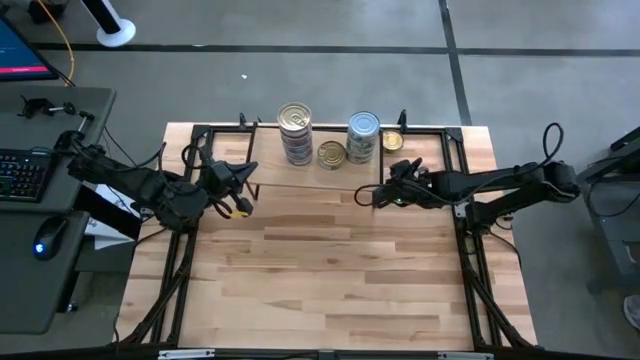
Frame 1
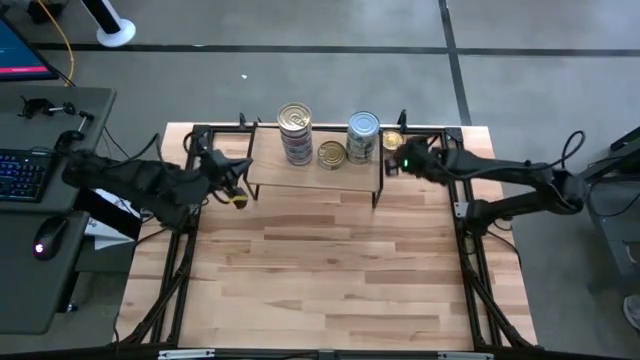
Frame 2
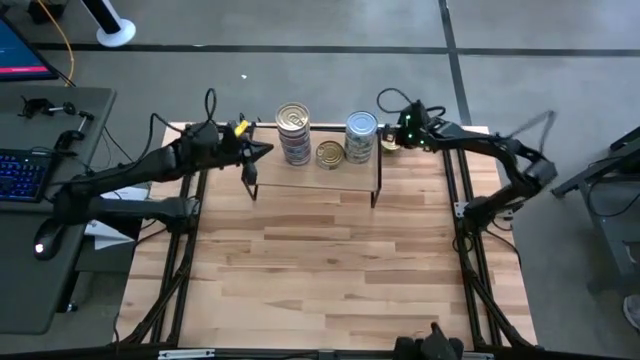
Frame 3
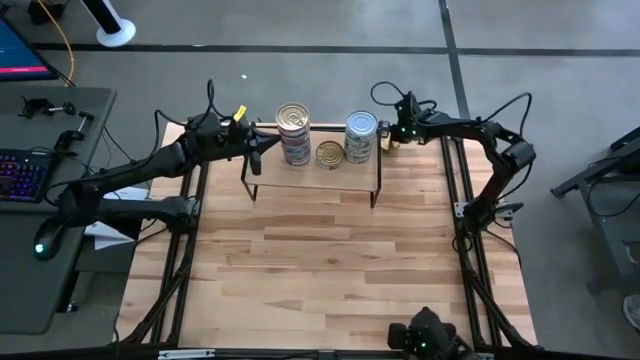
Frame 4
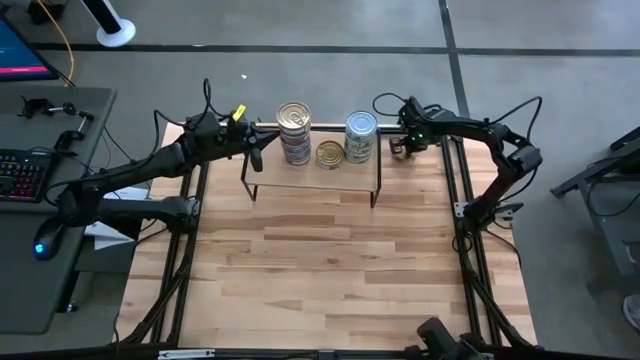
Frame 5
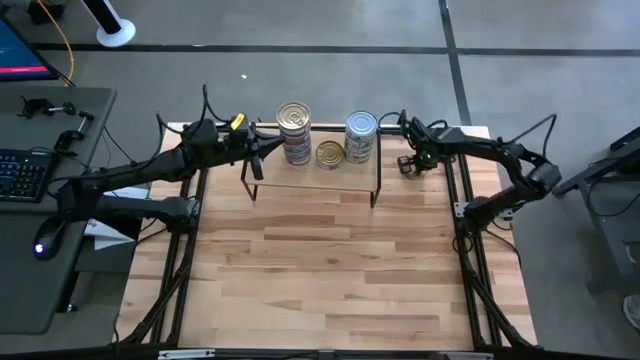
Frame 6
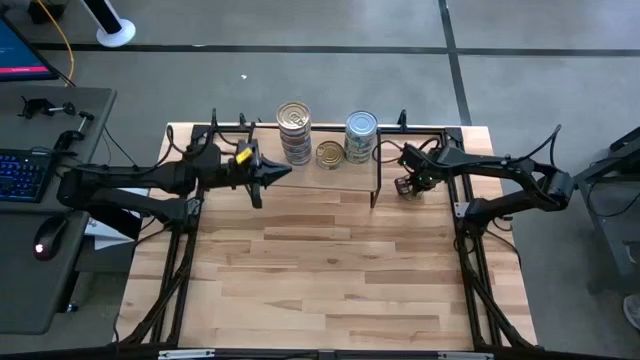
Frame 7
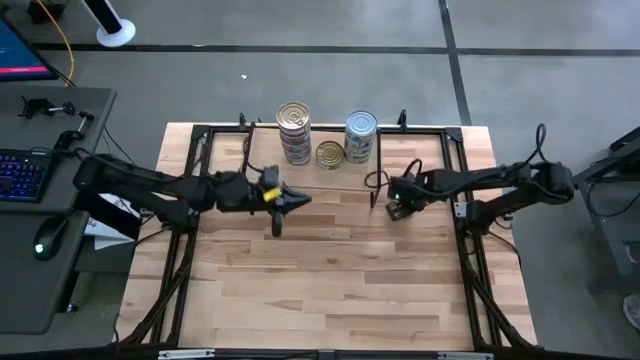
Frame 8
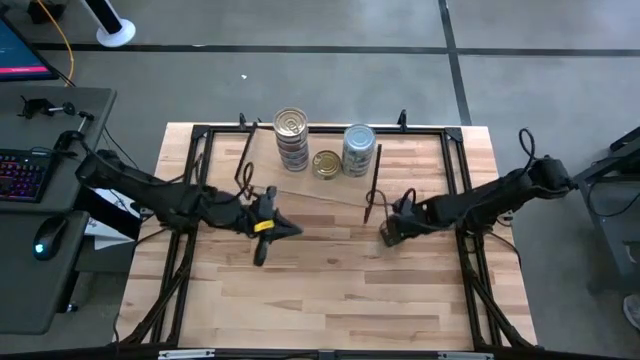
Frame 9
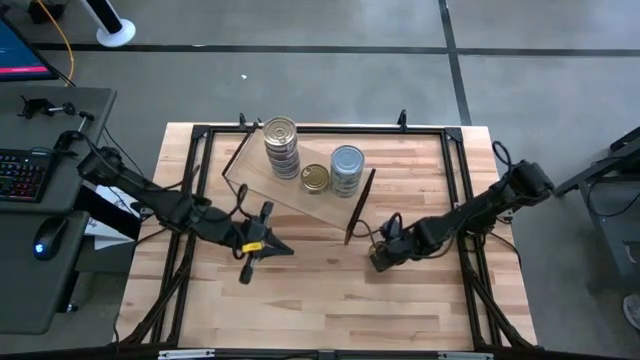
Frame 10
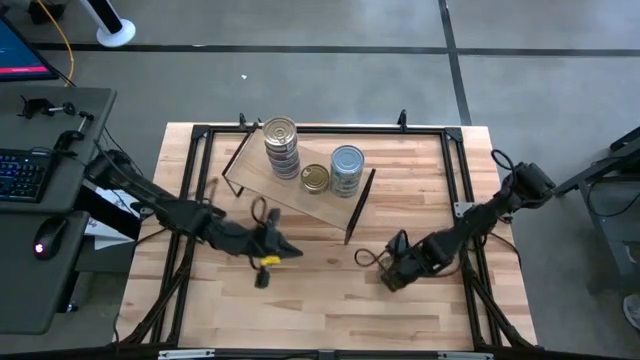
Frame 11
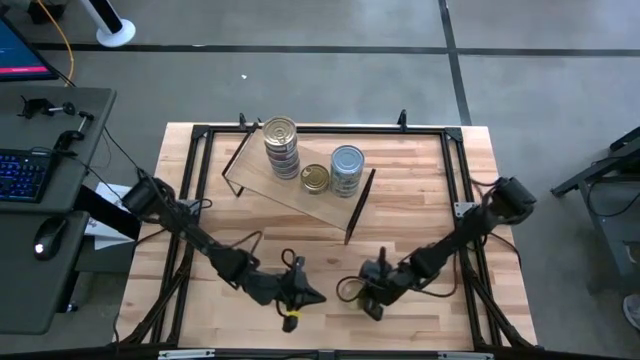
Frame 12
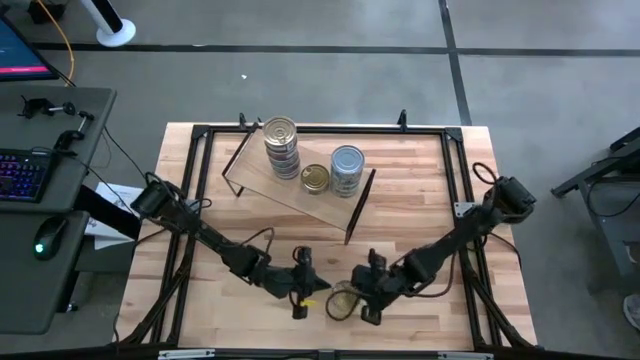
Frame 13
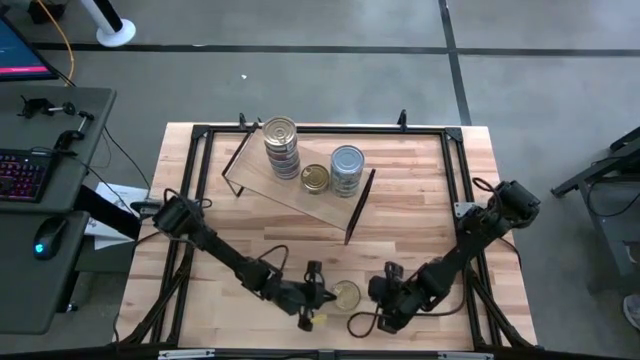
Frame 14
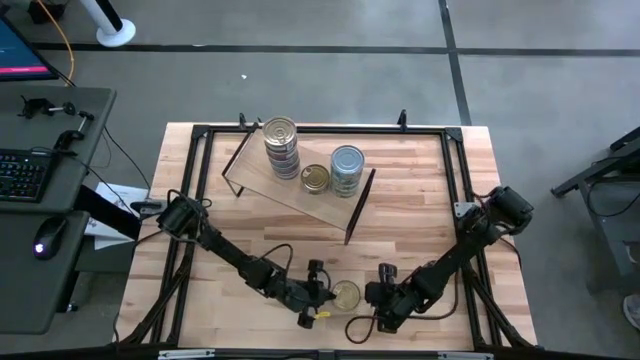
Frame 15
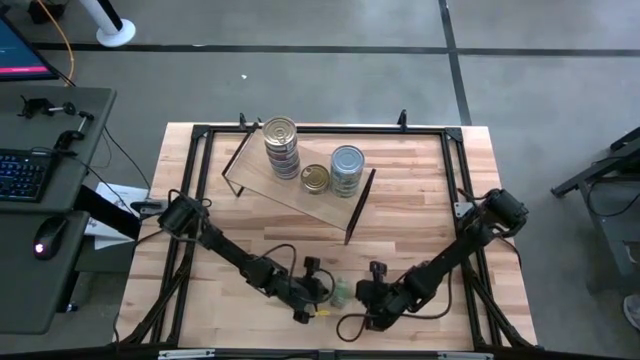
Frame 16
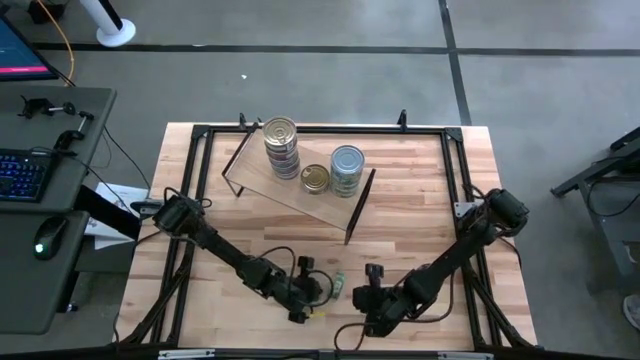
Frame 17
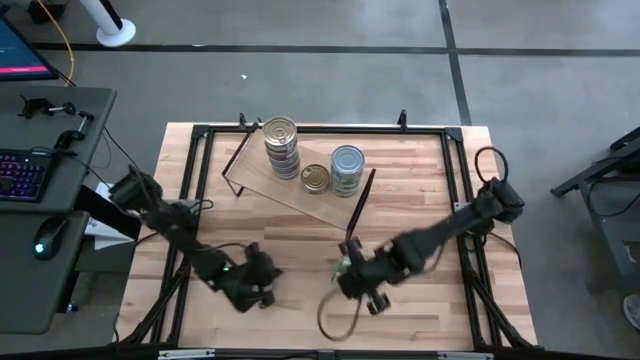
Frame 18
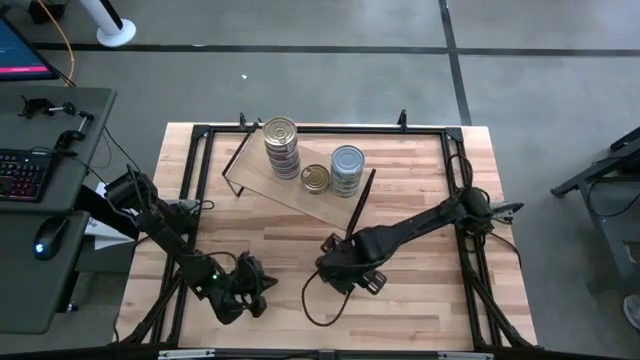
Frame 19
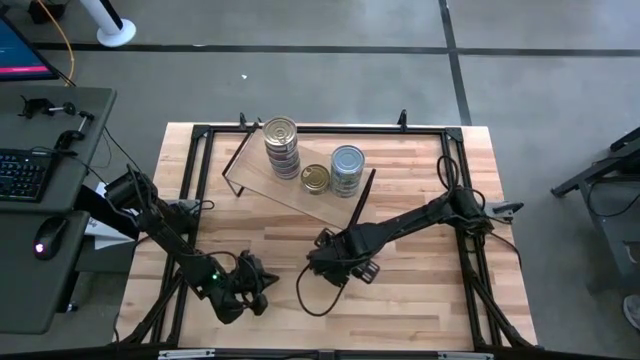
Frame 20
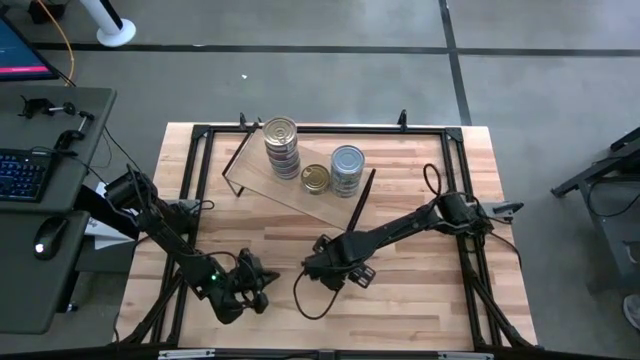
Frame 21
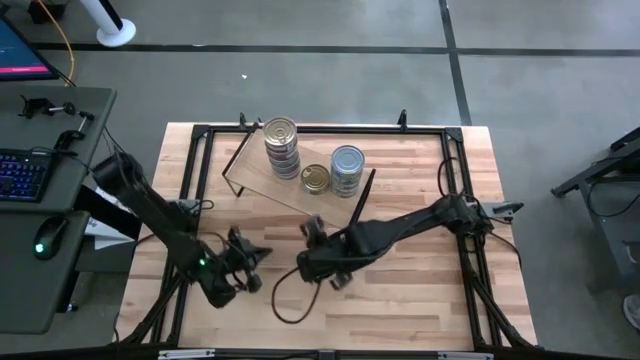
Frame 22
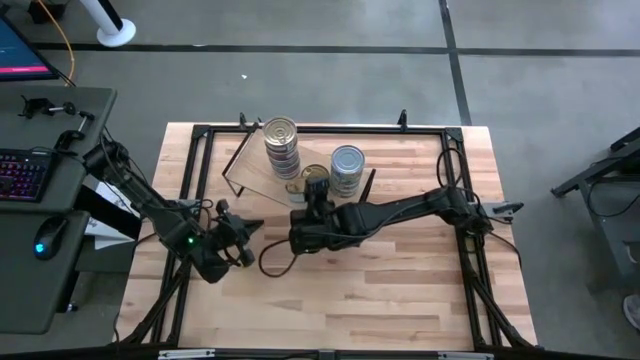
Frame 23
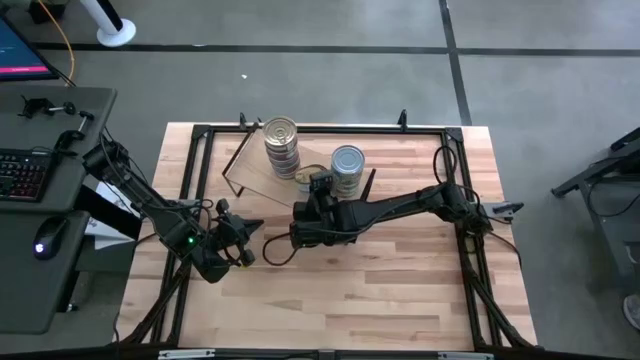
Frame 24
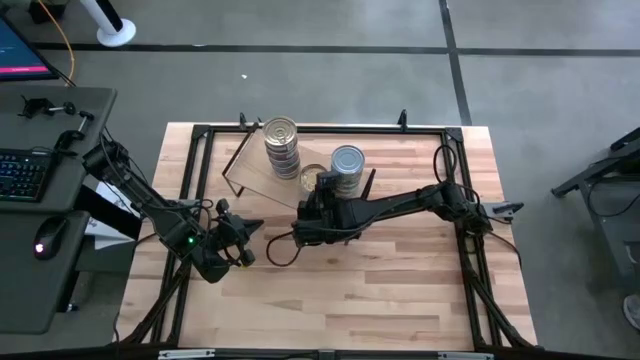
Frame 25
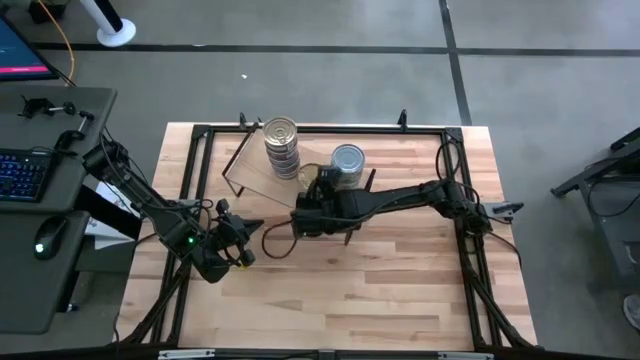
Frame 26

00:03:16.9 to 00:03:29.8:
Task: Stack canned seafood by type on shelf
Stack the green tuna can on top of the other green tuna can on the shelf

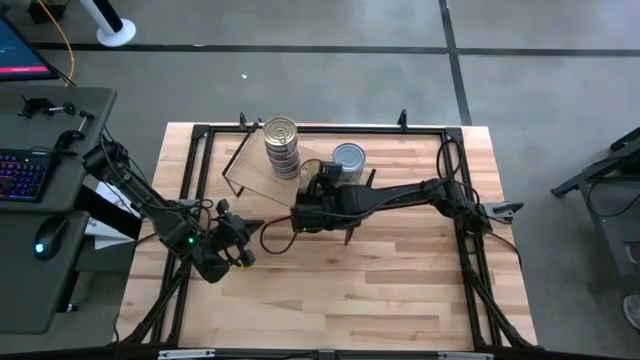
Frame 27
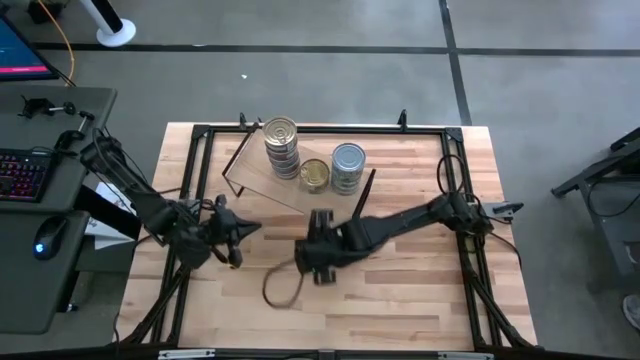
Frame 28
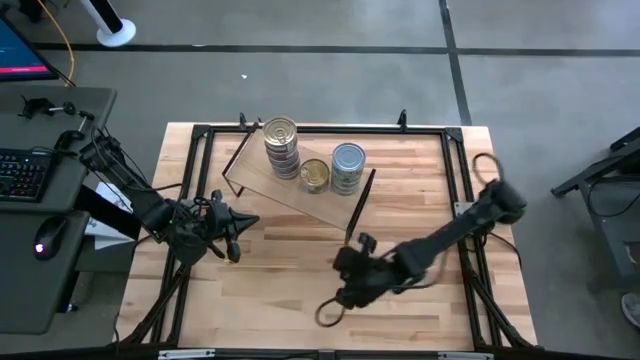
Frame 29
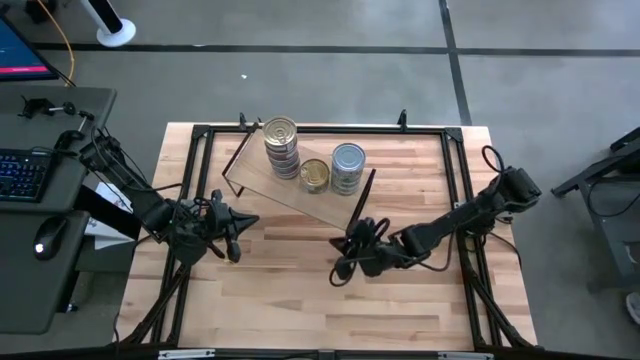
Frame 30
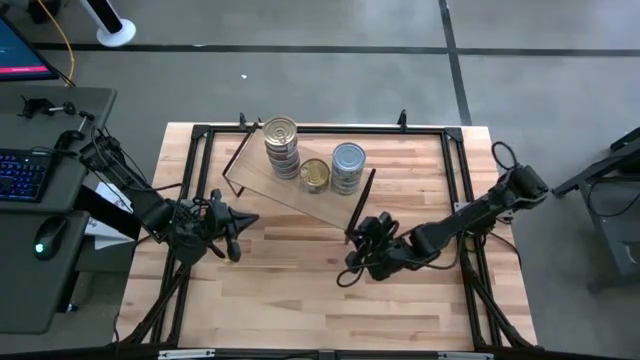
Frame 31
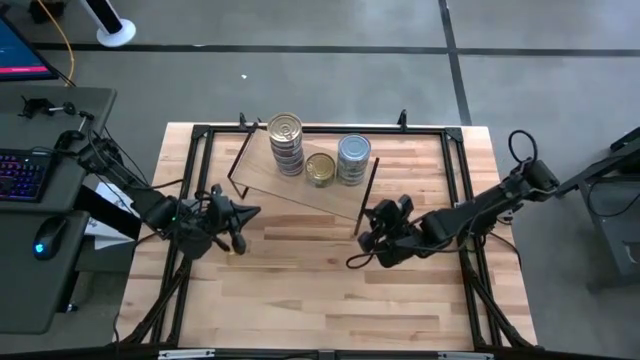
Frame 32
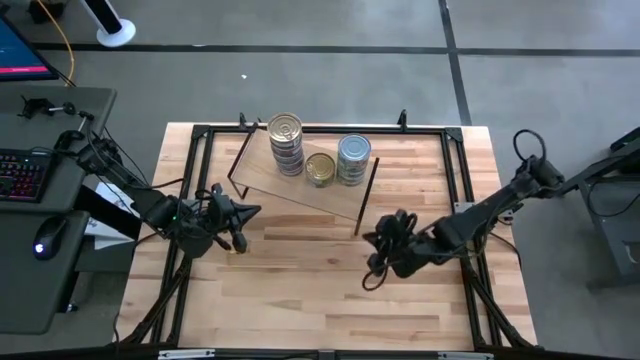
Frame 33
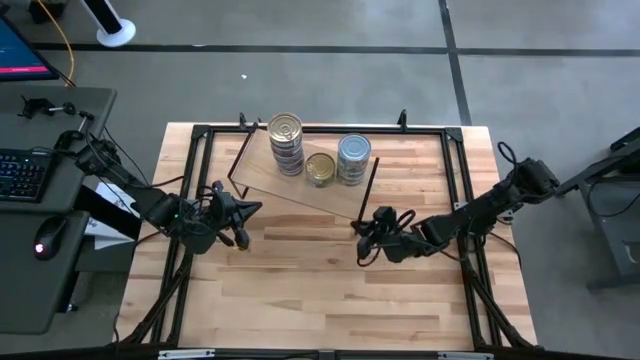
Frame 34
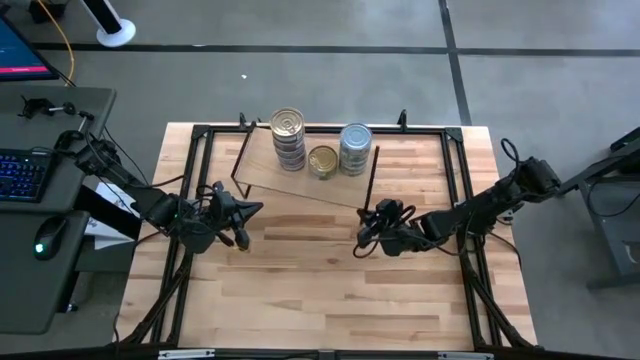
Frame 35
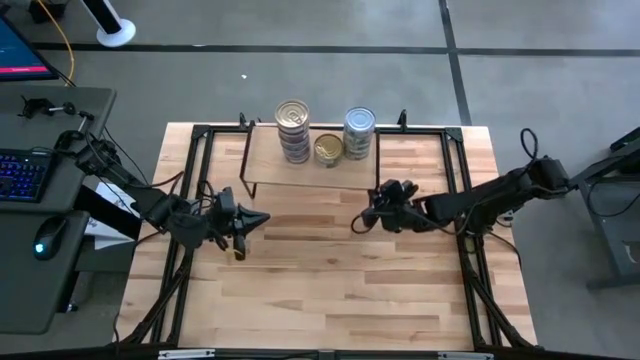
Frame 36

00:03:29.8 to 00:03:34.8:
Adjust the shelf on the table

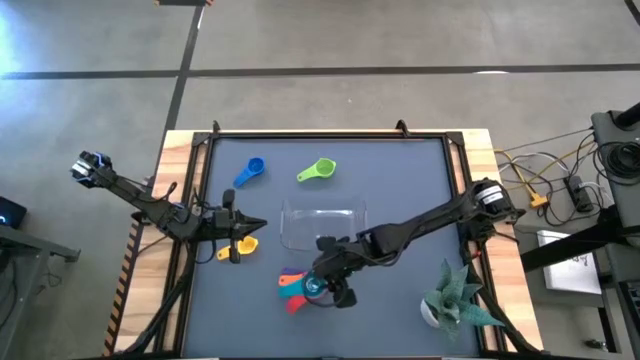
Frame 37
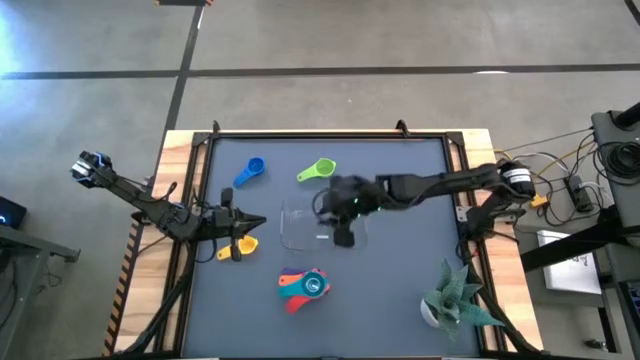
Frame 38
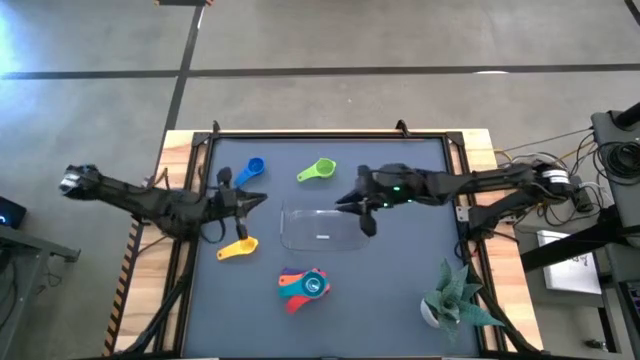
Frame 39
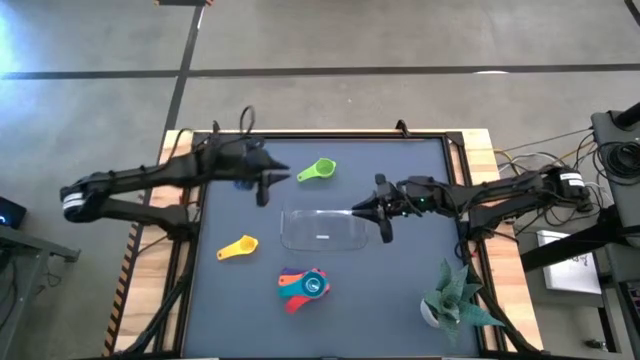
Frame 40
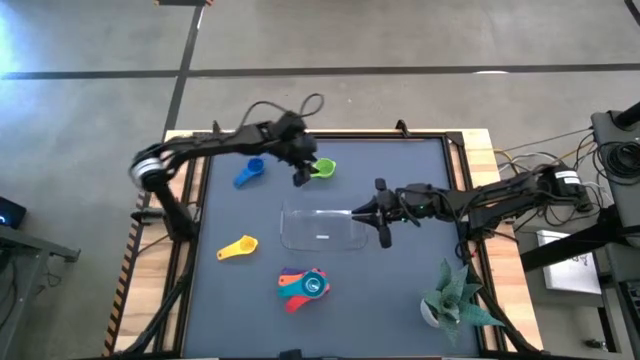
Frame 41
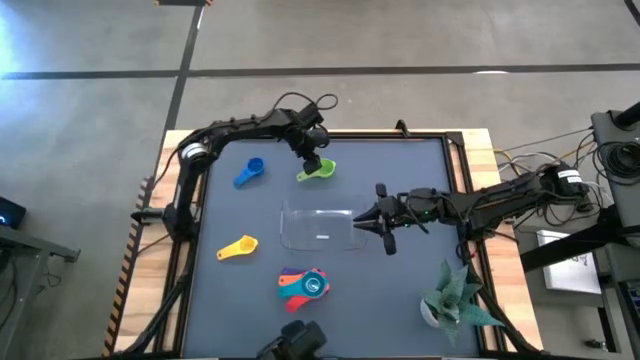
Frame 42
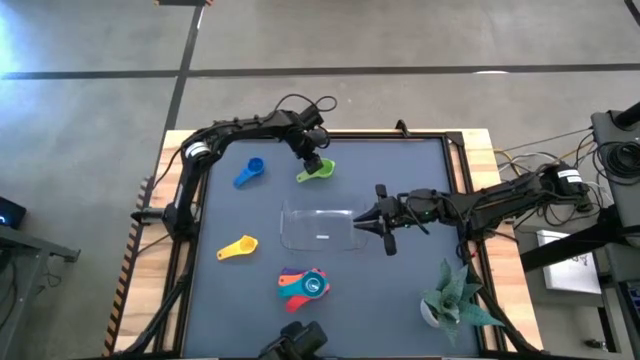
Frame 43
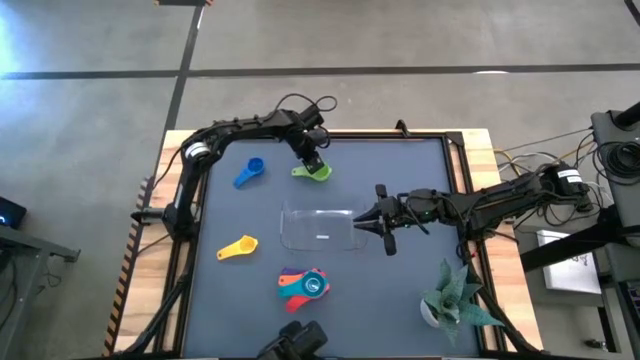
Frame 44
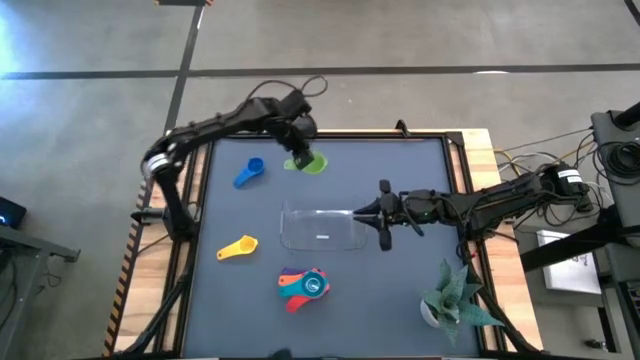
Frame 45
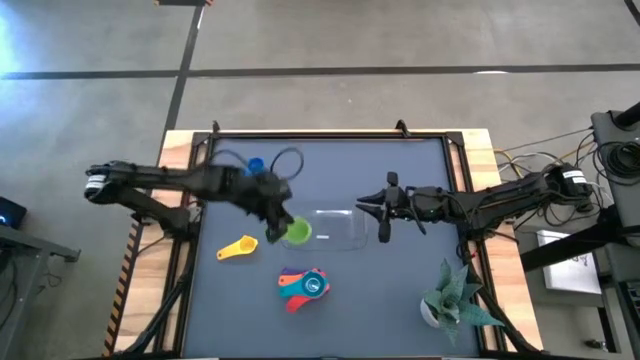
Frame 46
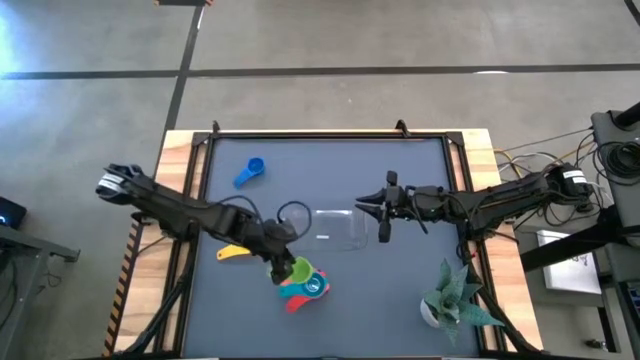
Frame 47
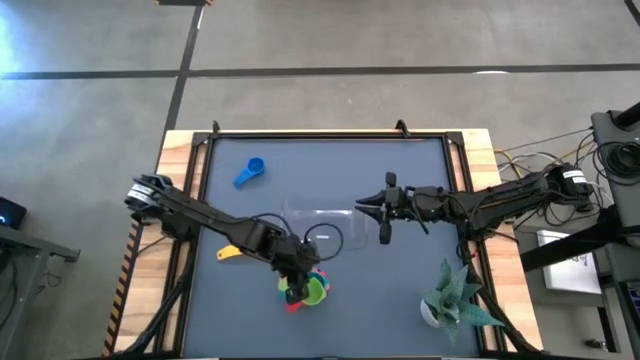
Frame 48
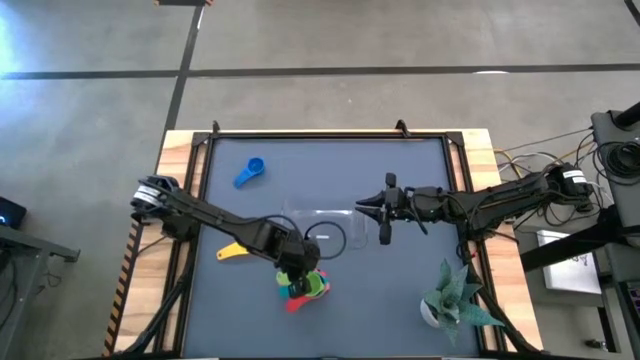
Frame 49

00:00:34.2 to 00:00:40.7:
Task: Nest measuring cups in basket
Stack the green measuring cup on top of the light blue measuring cup
